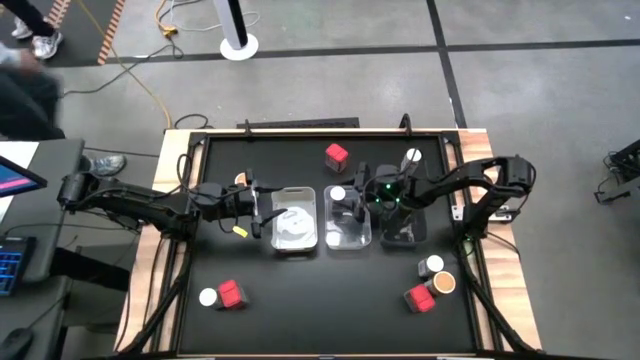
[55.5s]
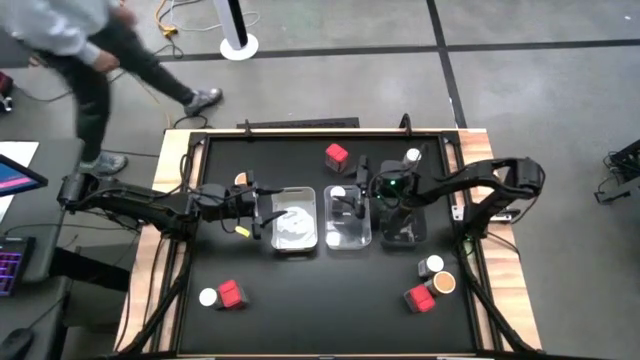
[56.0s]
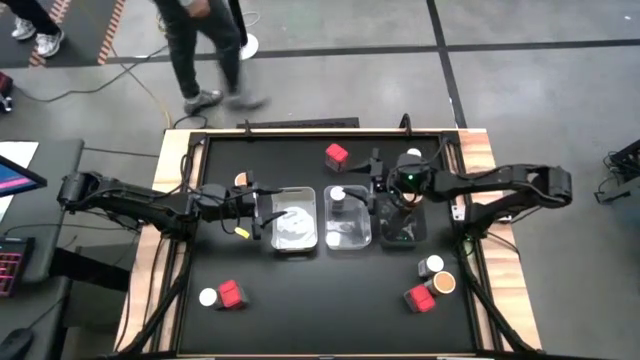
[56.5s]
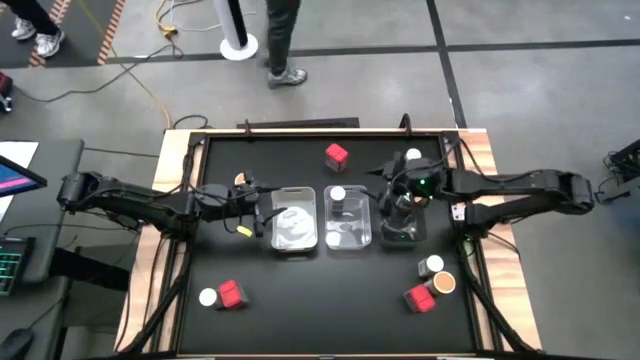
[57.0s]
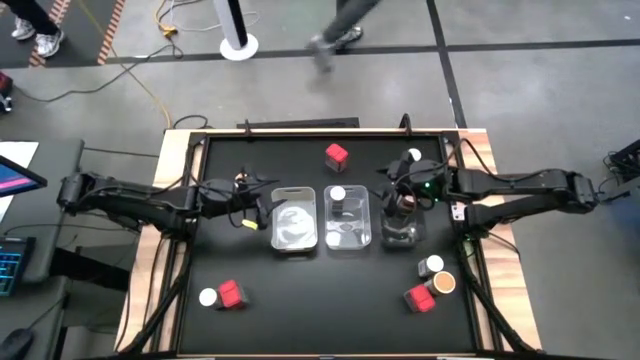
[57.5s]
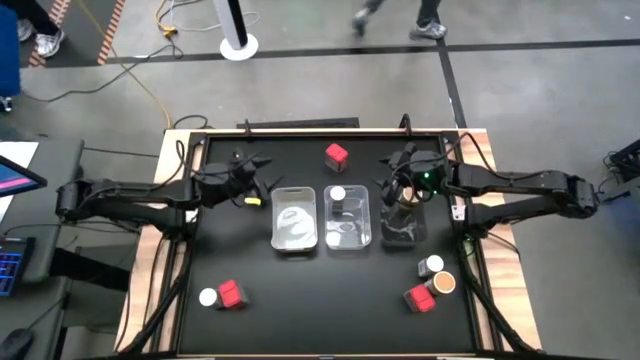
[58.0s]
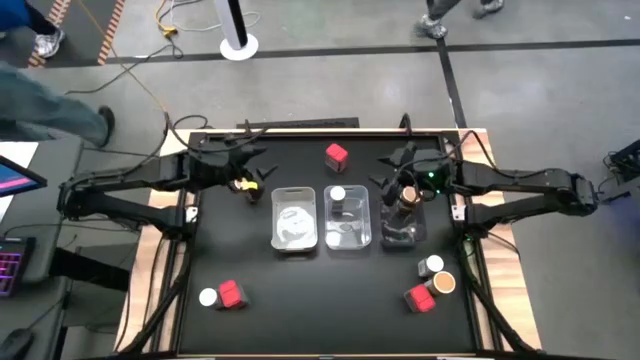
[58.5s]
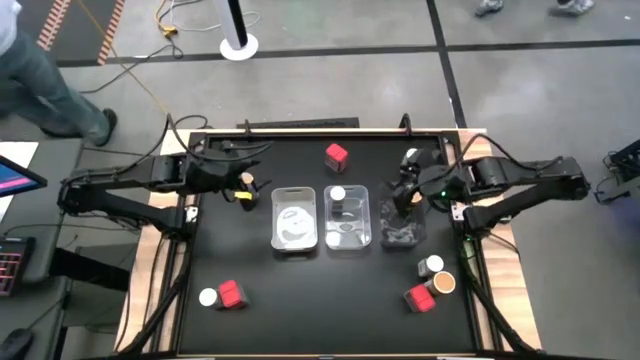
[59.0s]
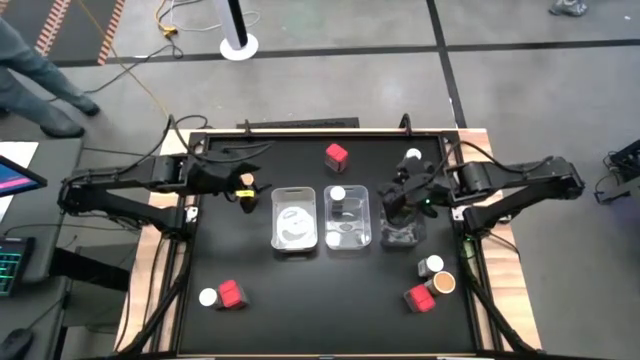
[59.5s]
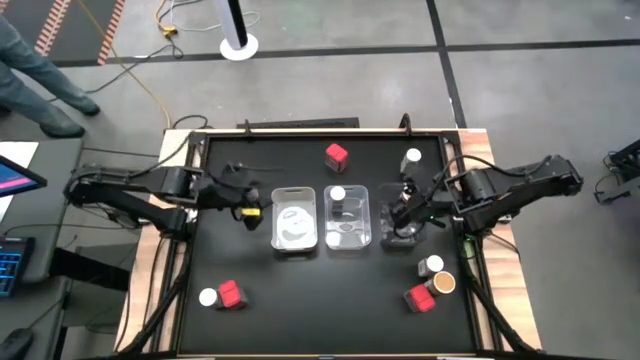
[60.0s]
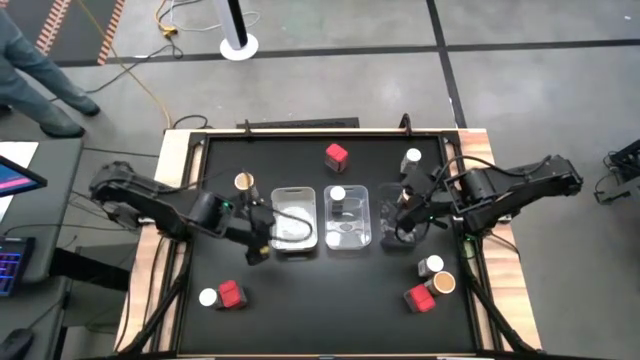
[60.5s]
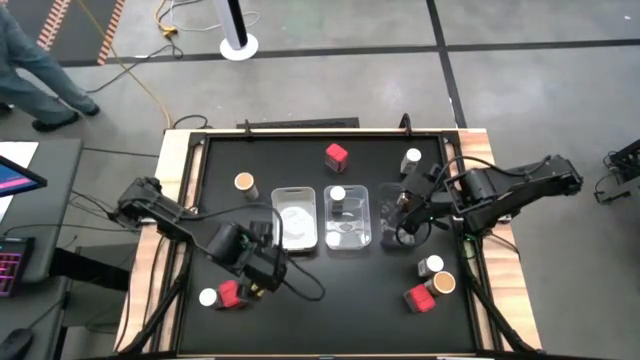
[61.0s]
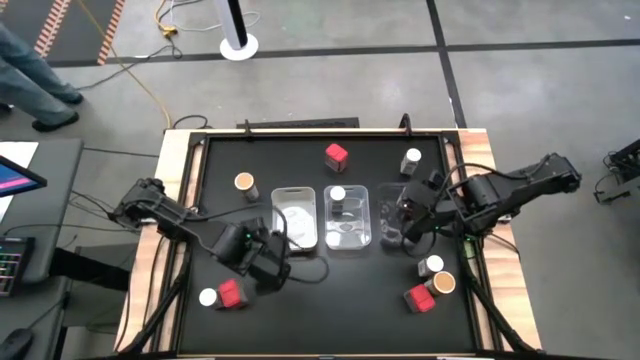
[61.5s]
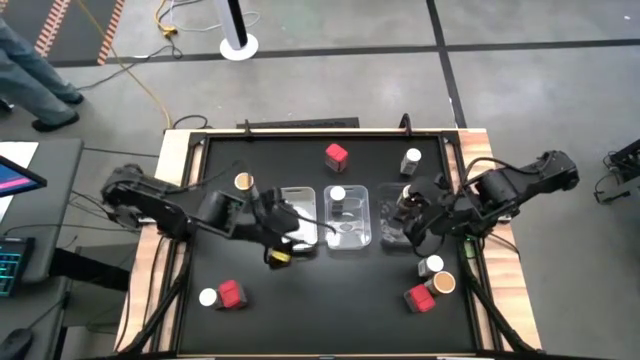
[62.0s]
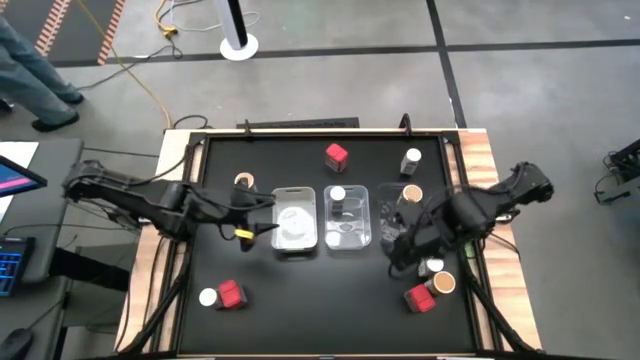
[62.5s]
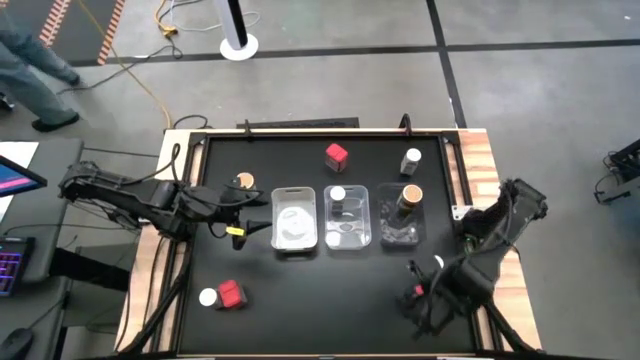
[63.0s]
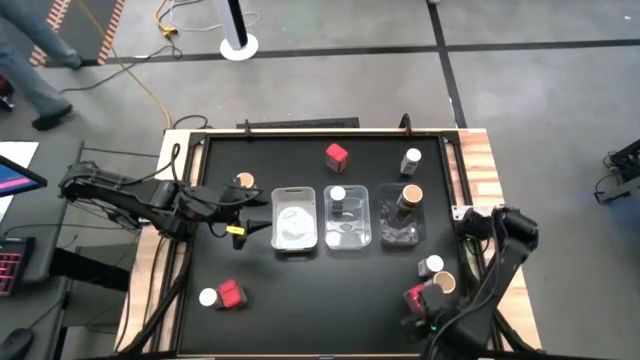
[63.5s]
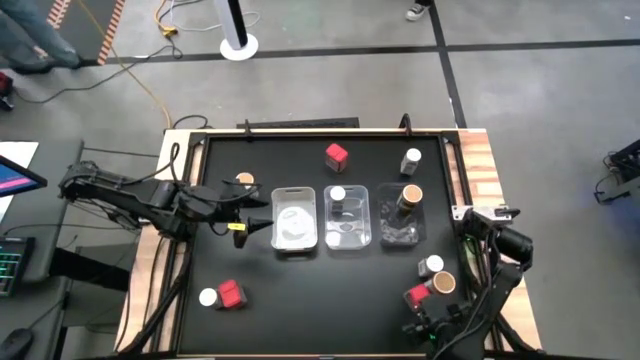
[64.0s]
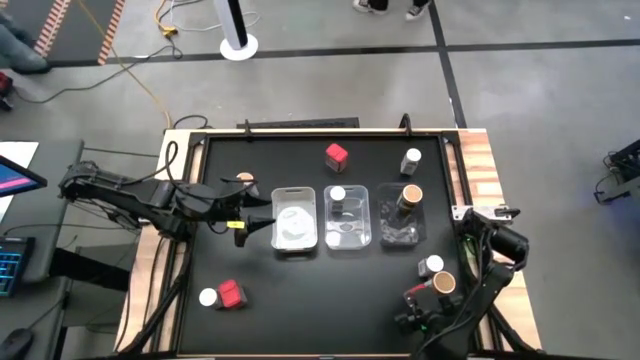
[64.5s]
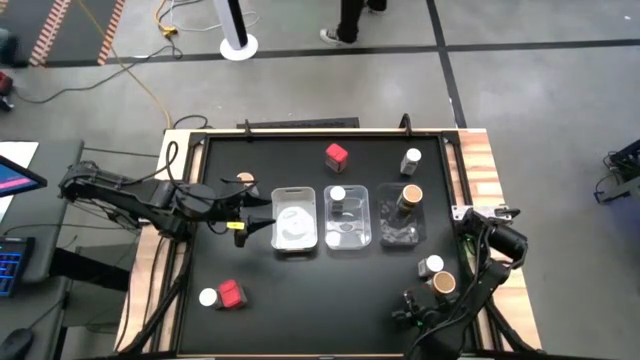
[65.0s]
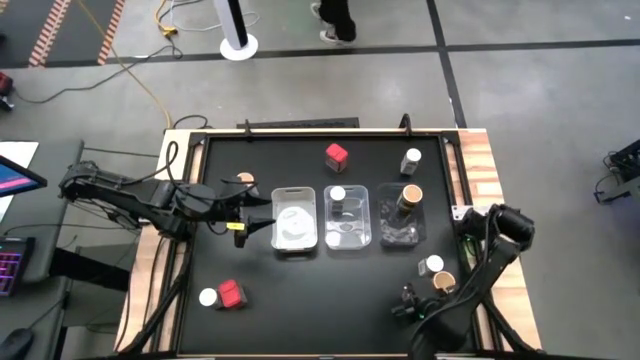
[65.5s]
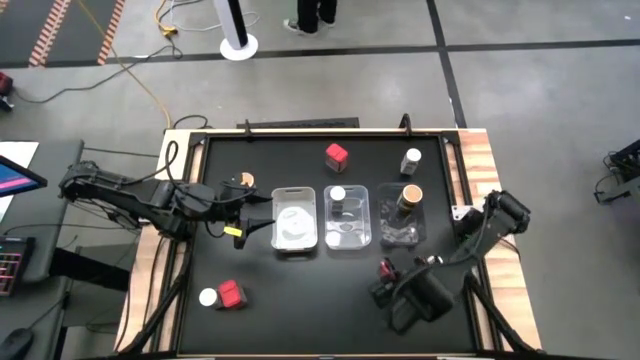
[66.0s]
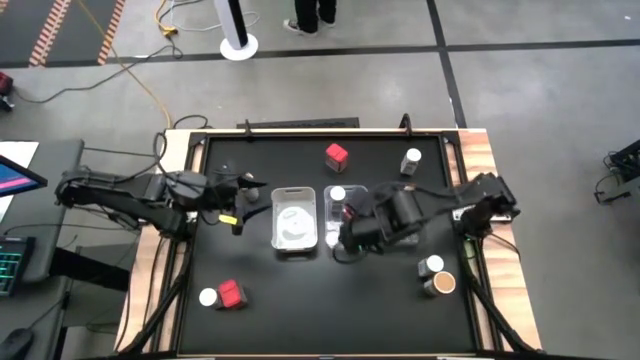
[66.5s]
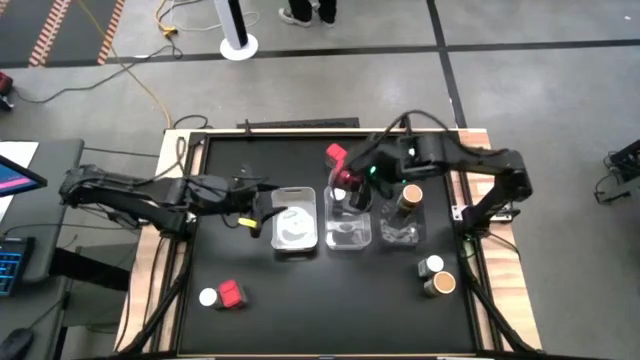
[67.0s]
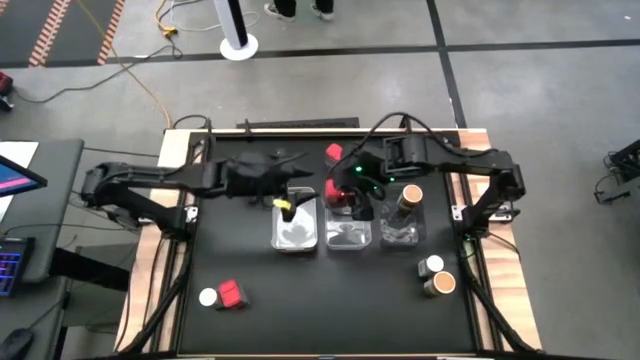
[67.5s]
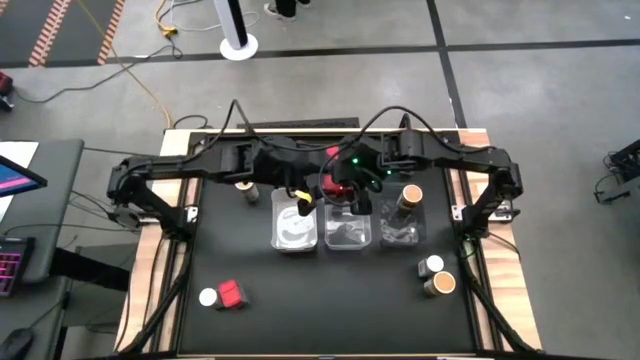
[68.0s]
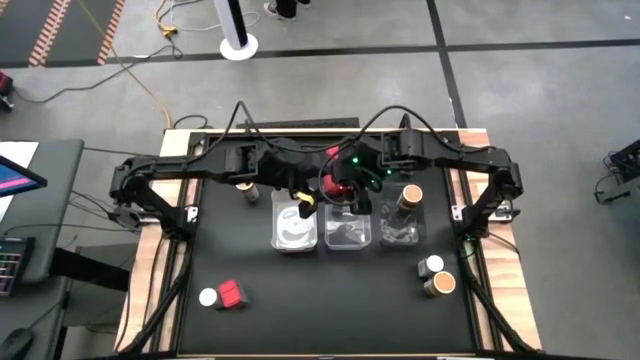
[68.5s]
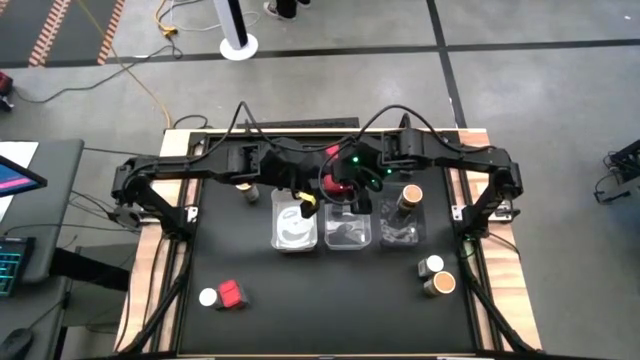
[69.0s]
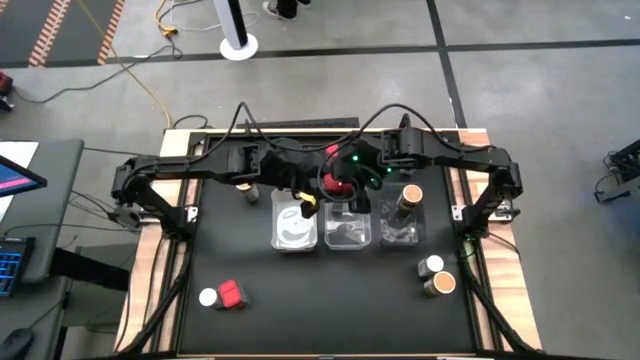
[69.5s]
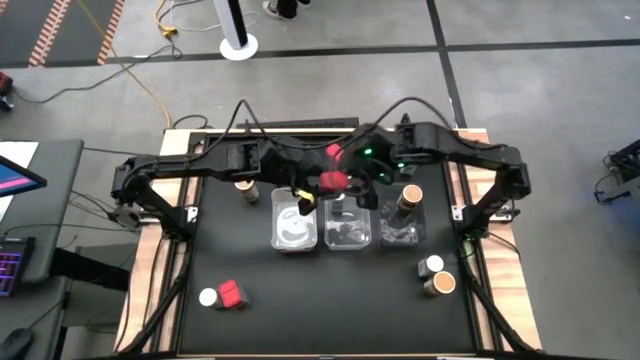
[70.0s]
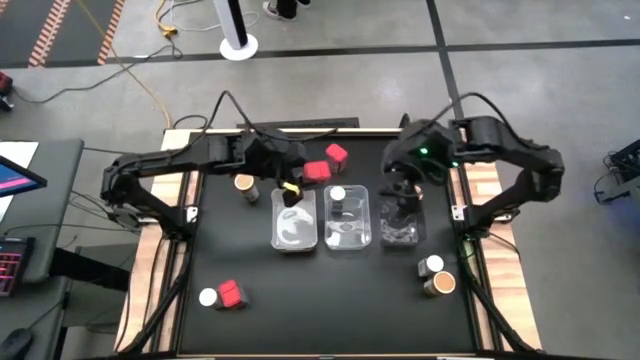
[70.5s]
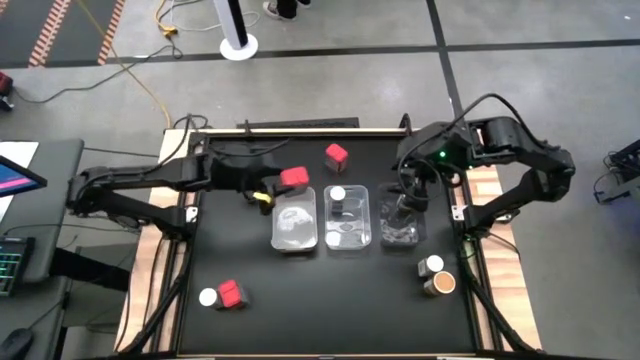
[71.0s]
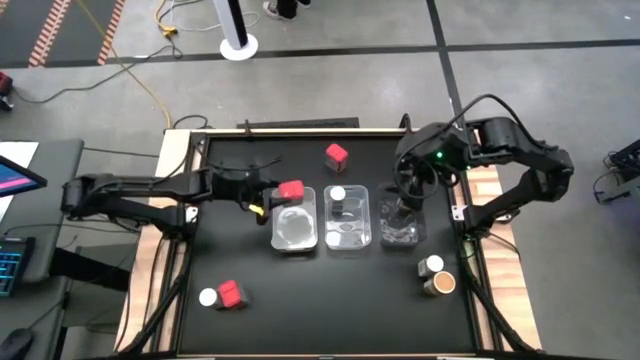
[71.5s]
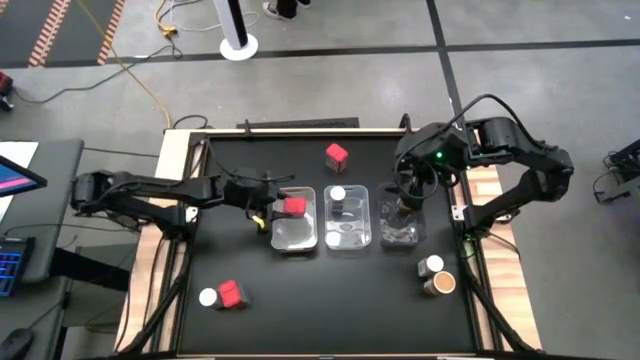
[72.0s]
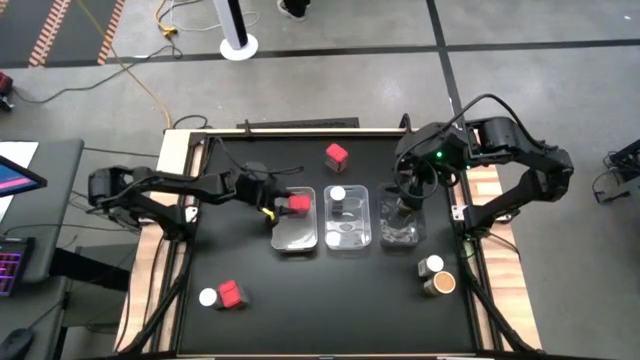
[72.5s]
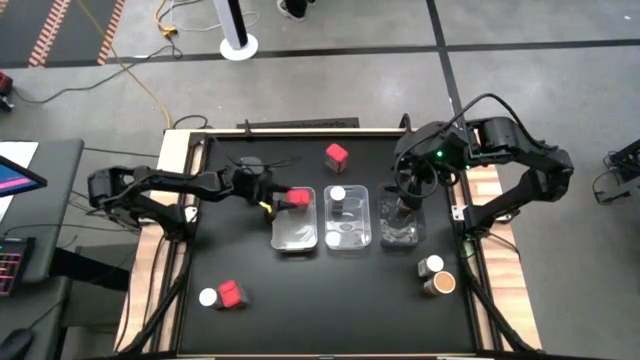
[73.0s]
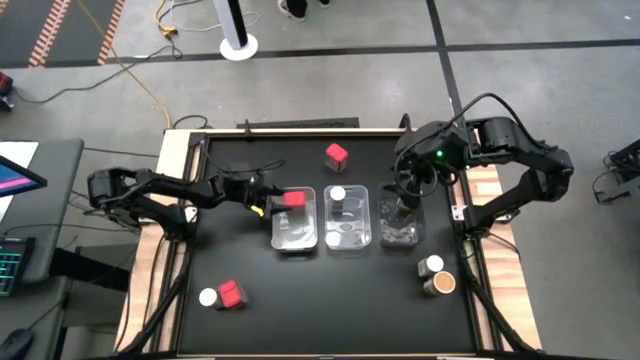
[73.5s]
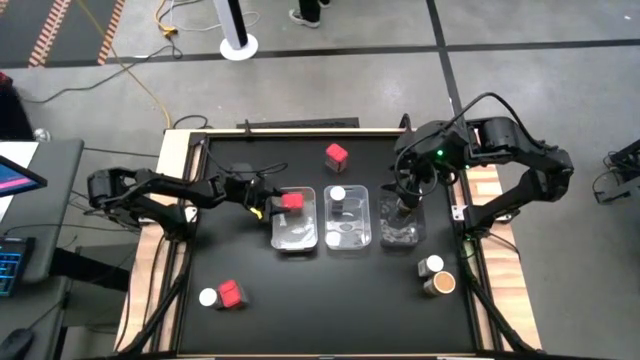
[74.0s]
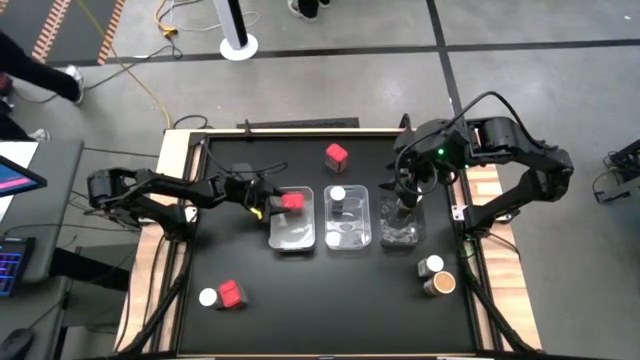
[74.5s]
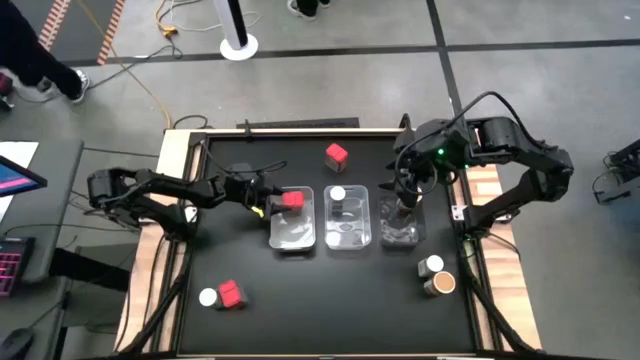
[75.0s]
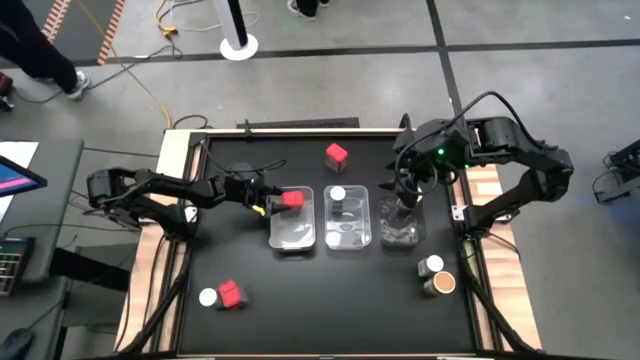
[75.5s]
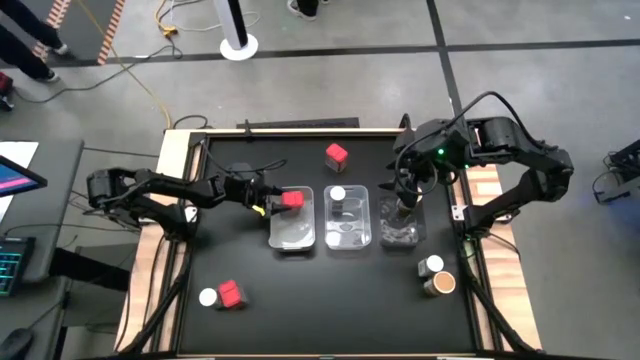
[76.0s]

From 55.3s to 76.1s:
Task: Sort spices by type
Put the bottom right red seasoning can into the white bin

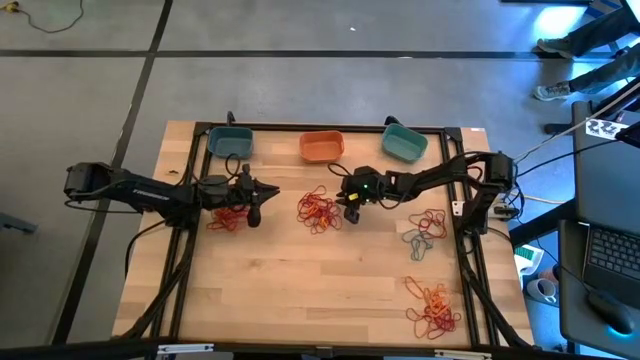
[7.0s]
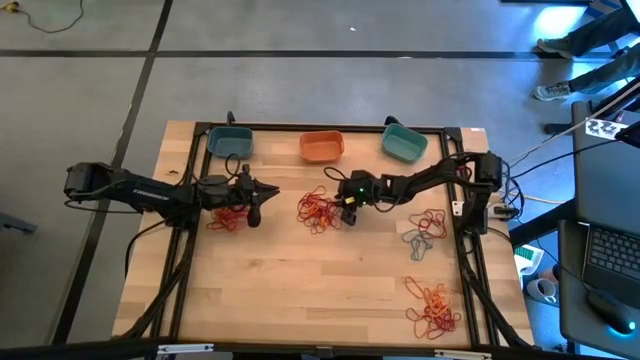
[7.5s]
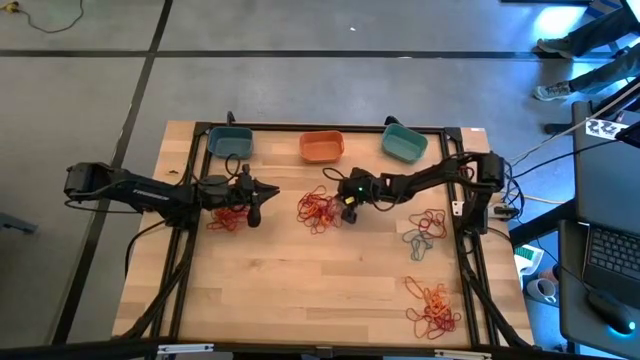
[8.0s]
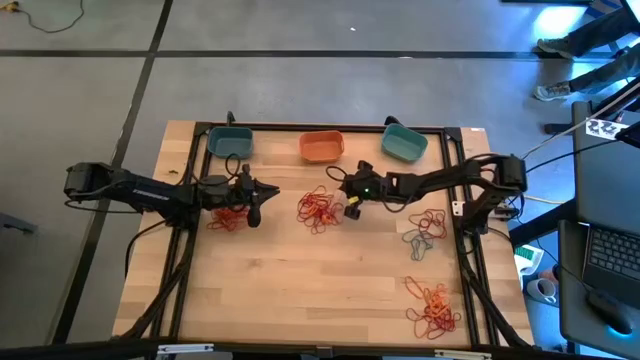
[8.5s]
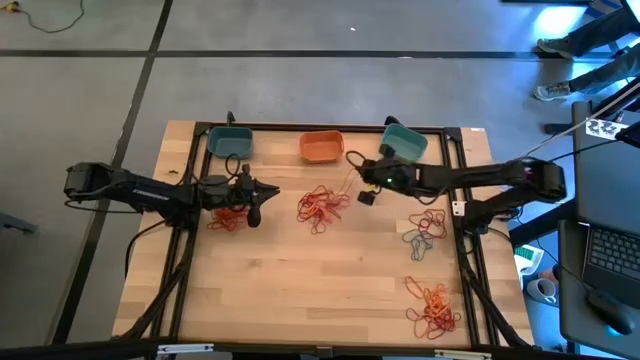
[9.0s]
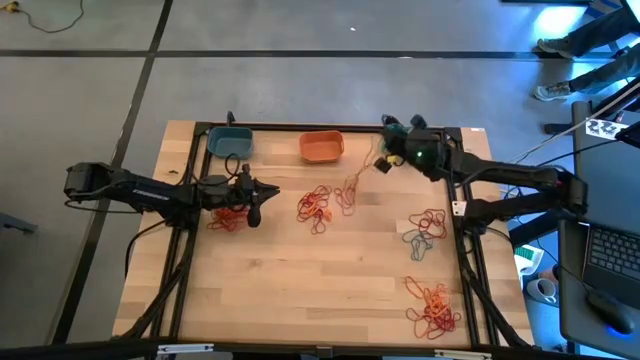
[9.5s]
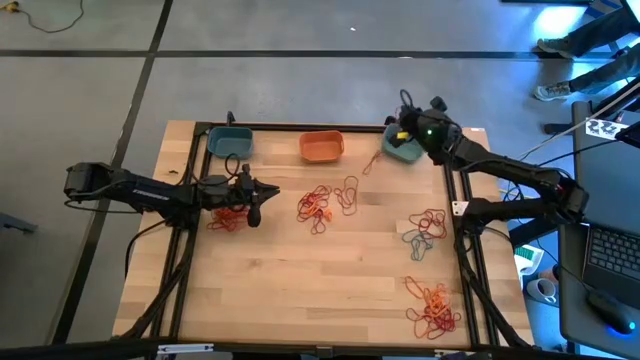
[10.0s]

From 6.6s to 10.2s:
Task: Sort rubber bands into baskets
Put the red rubber band into the green bin
